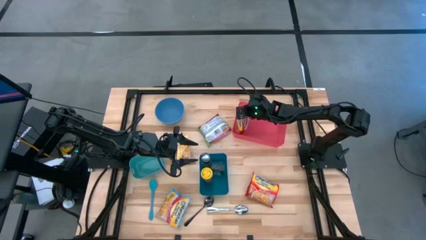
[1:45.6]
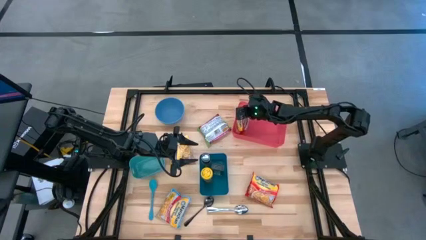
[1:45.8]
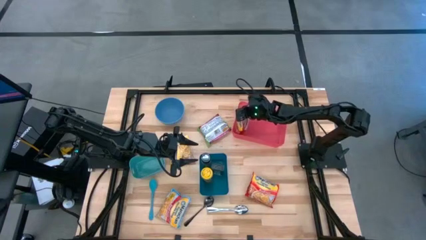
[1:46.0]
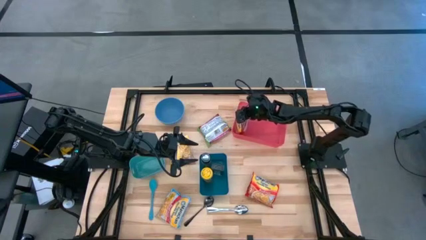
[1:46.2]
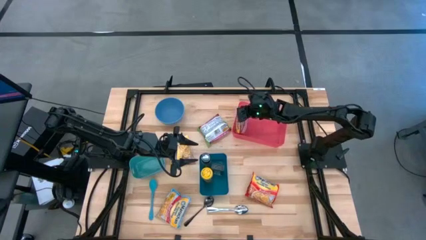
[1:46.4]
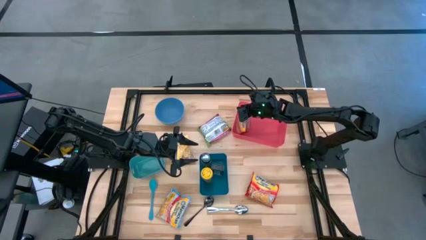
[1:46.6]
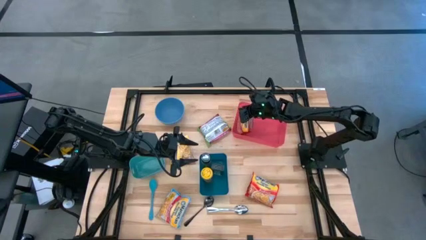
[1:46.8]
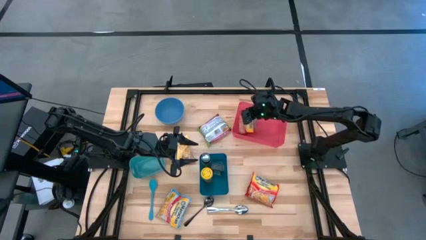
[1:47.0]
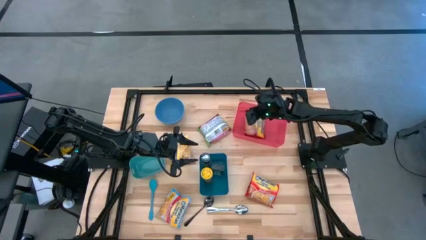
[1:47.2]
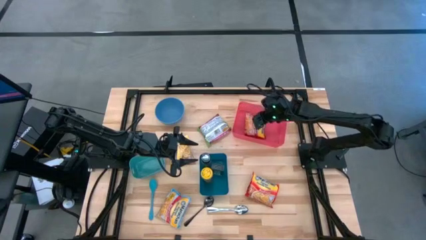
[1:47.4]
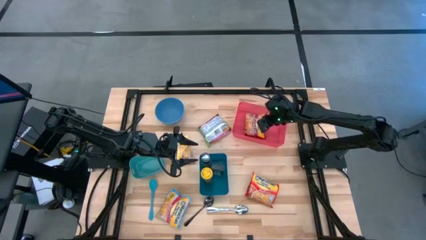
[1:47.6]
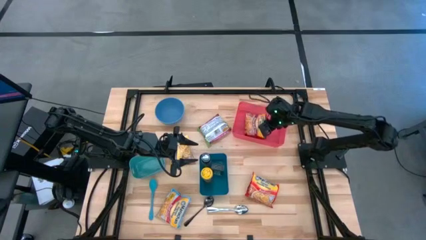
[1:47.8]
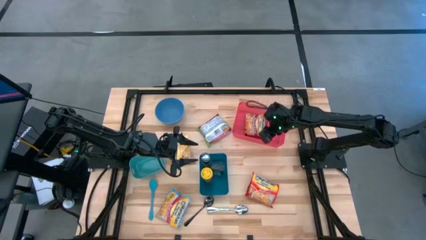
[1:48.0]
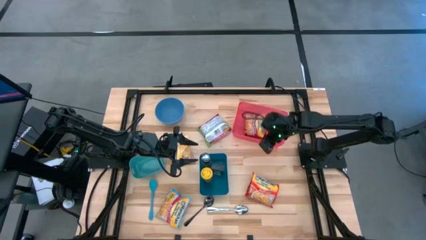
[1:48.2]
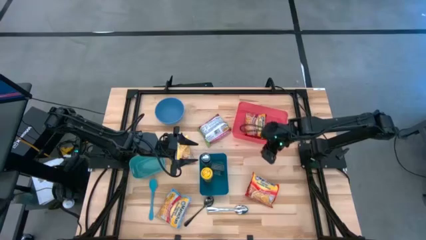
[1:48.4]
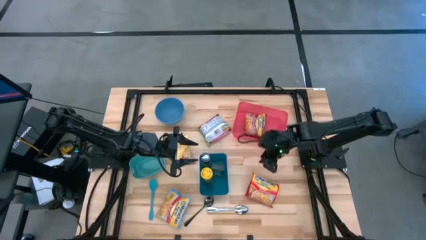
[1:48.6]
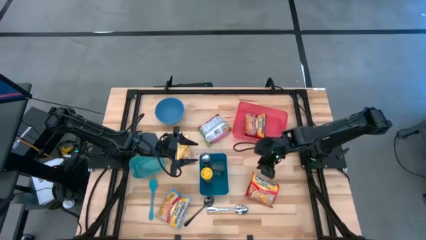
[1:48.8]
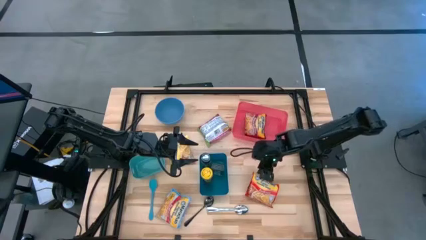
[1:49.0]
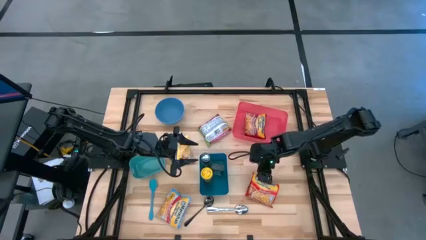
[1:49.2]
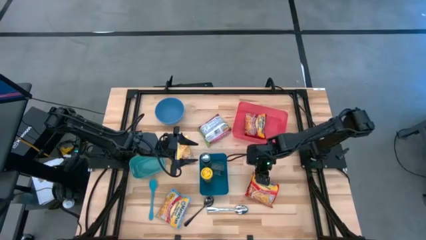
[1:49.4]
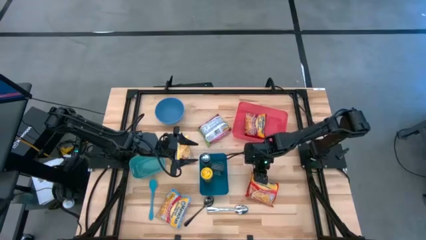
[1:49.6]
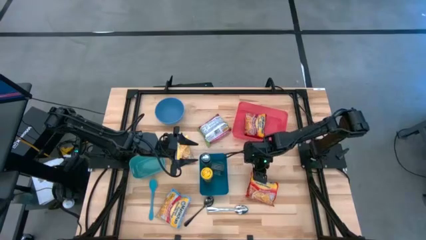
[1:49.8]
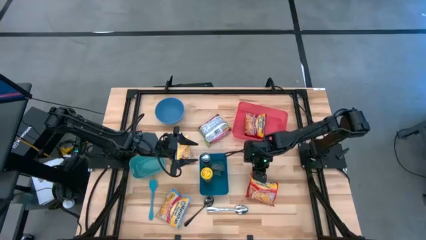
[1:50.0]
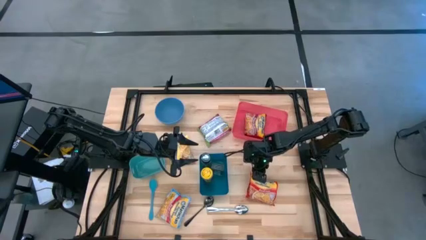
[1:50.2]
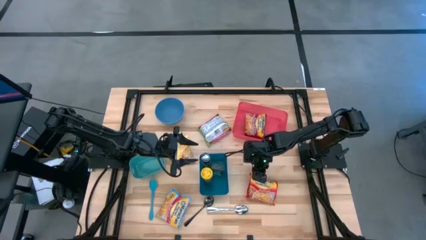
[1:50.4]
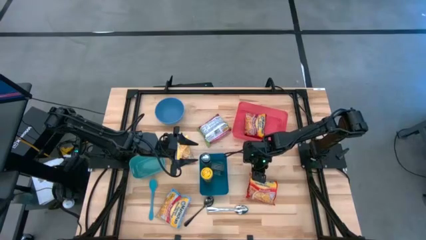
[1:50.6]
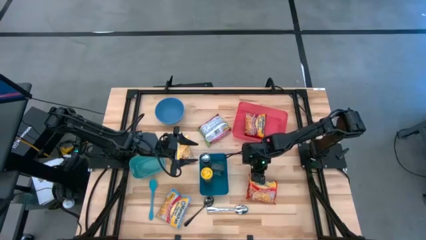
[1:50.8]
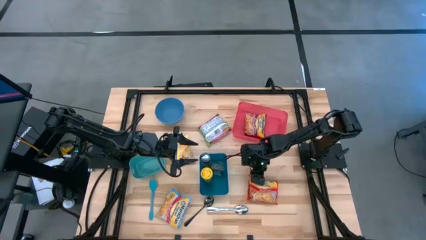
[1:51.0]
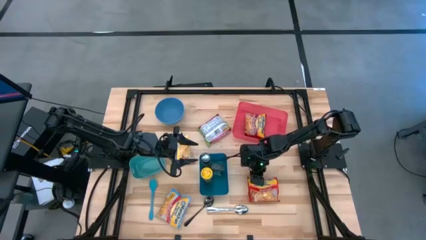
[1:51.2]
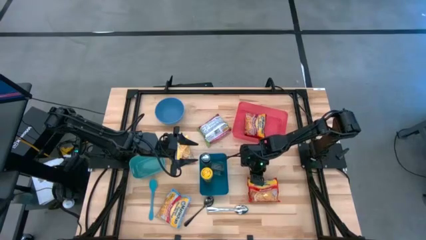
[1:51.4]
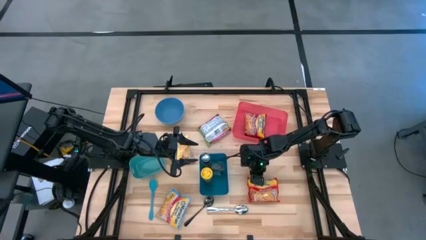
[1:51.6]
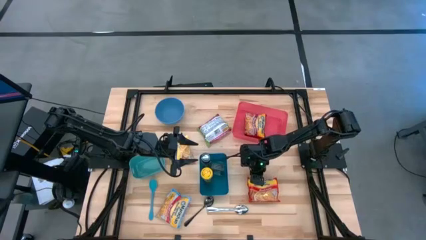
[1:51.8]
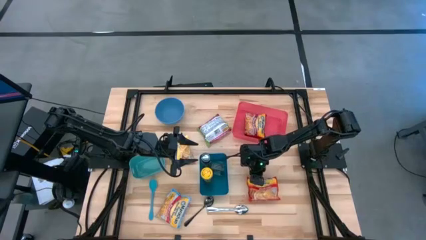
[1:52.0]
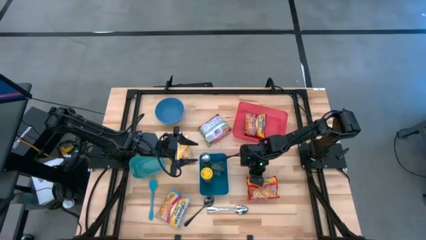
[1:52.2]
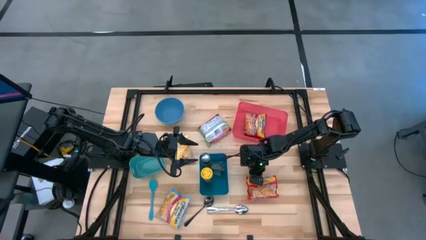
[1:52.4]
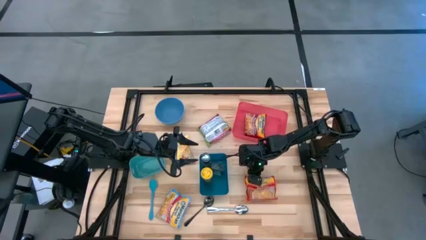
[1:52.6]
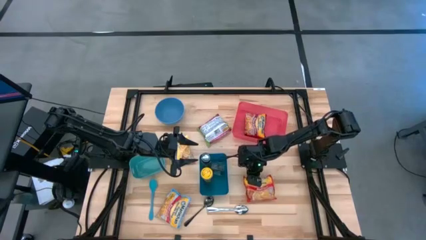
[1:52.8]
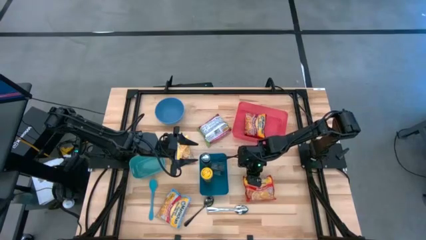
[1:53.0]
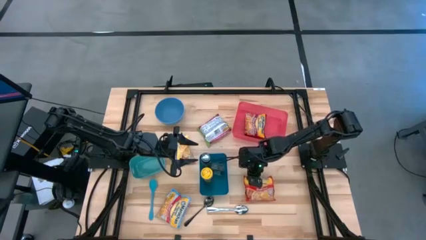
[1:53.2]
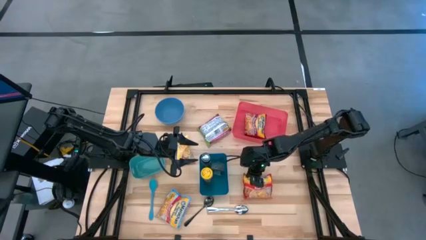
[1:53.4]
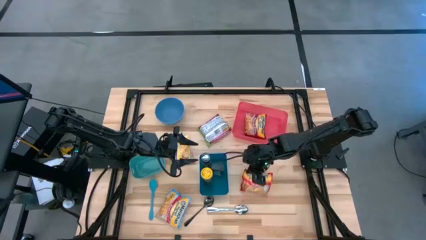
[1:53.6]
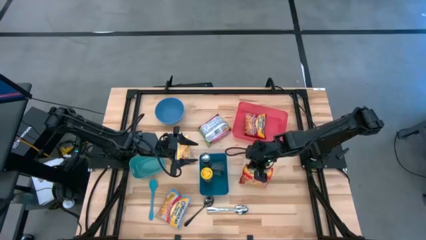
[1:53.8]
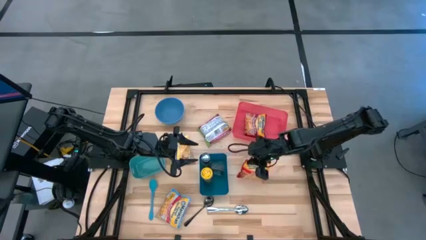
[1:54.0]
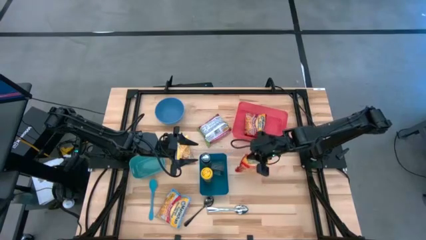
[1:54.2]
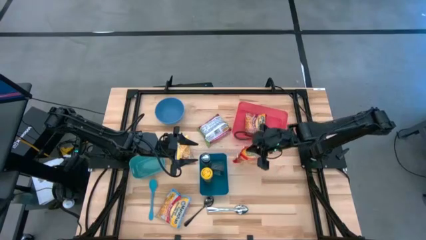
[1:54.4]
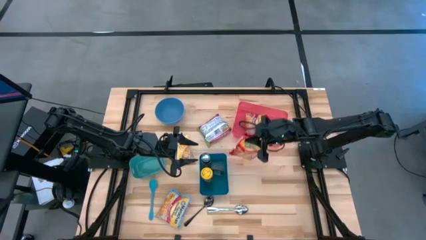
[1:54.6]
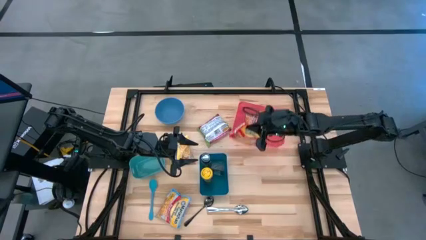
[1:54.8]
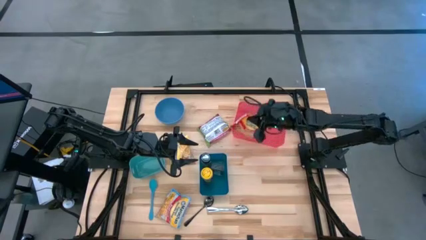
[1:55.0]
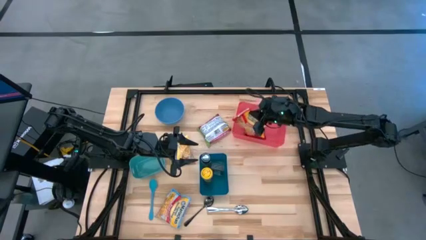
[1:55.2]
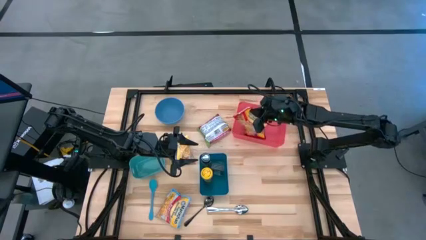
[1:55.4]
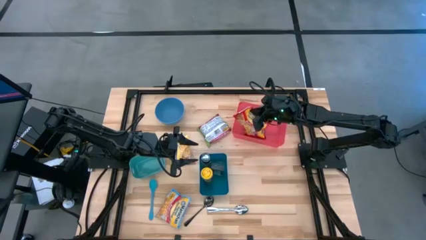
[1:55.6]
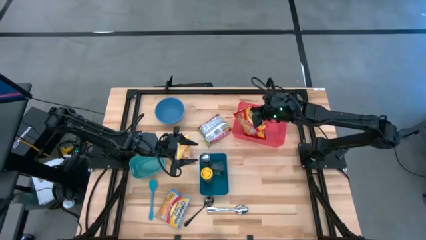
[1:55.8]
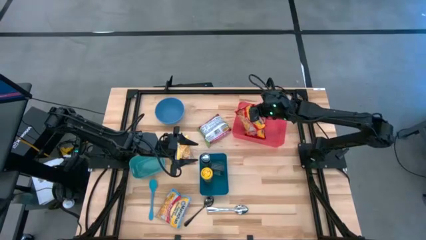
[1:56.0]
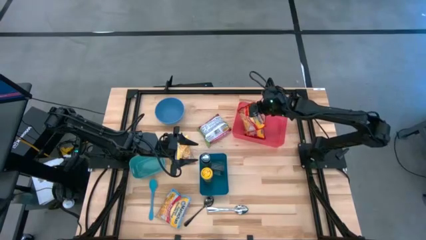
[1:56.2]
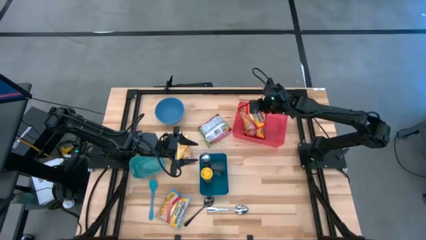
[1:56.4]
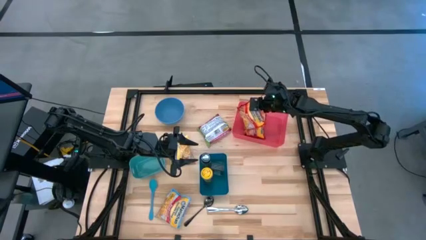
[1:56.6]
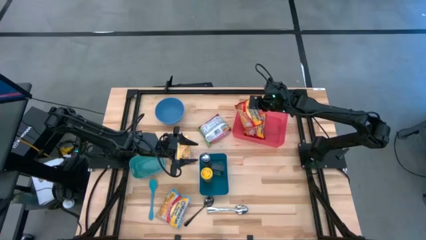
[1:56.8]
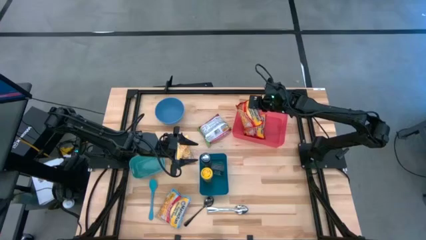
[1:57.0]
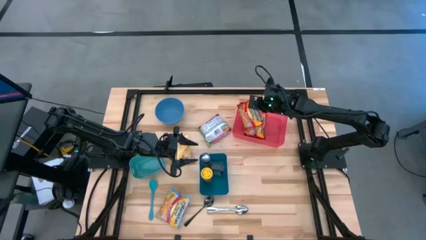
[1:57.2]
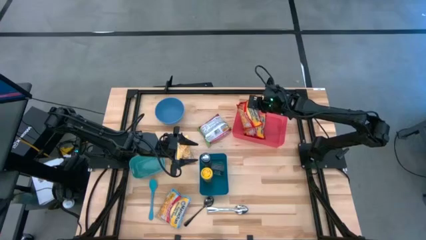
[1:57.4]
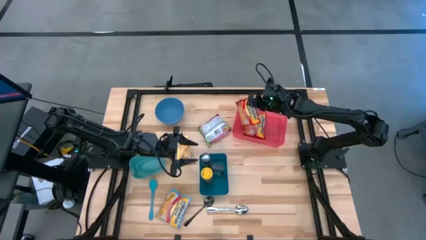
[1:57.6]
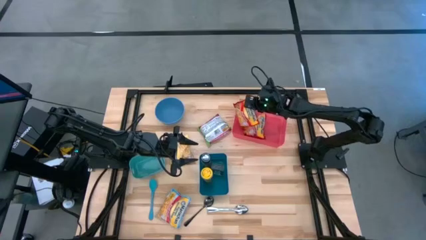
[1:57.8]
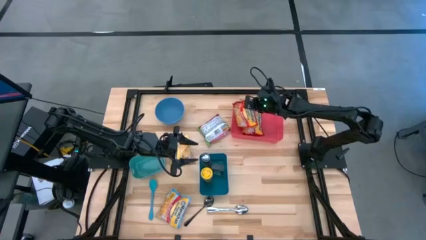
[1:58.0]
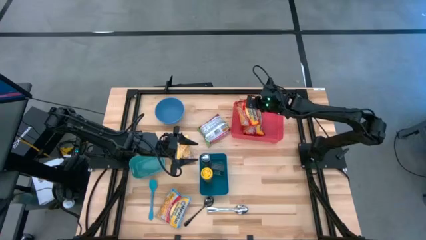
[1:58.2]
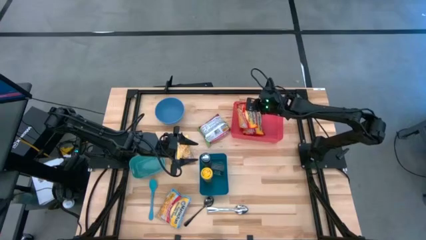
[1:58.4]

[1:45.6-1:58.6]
Task: Pick & Place Food Item
Put the red noodle pack into the red bin

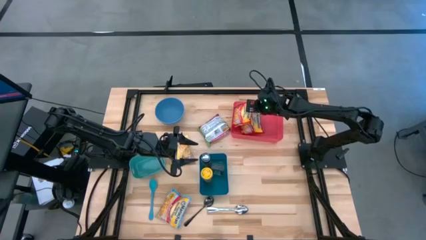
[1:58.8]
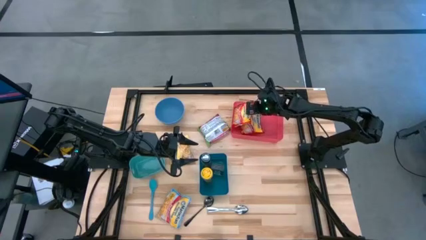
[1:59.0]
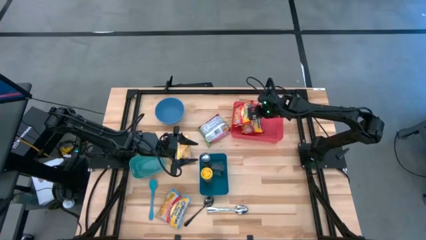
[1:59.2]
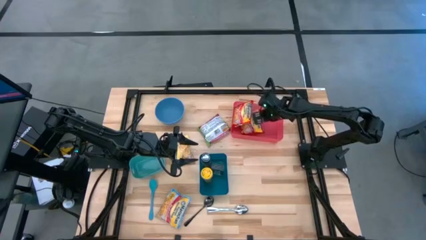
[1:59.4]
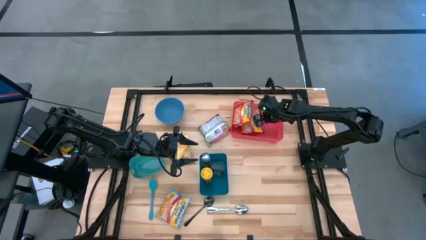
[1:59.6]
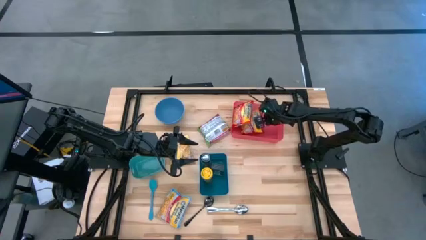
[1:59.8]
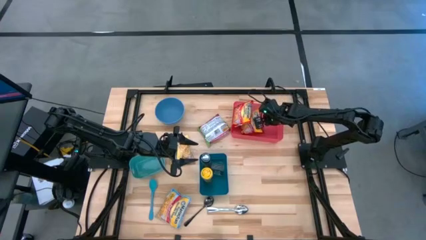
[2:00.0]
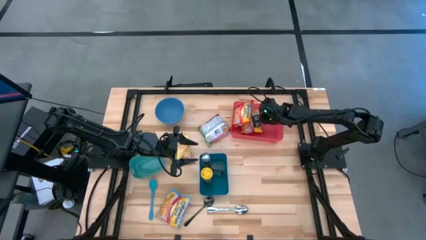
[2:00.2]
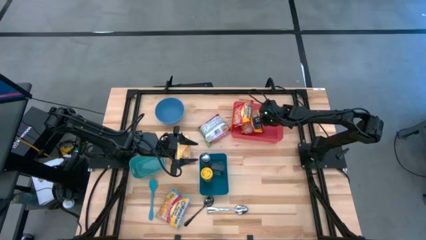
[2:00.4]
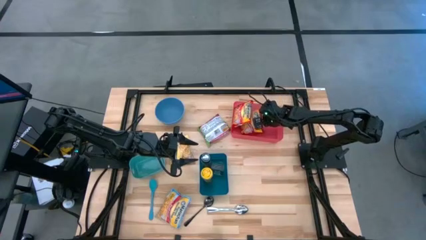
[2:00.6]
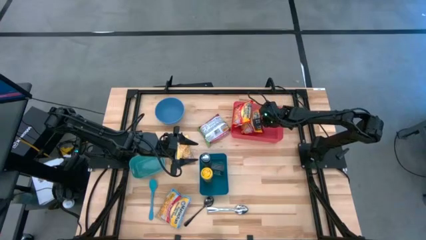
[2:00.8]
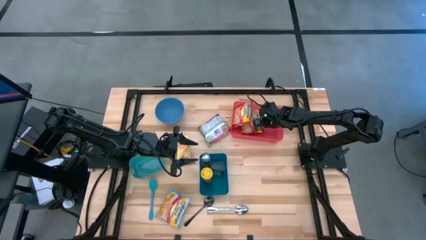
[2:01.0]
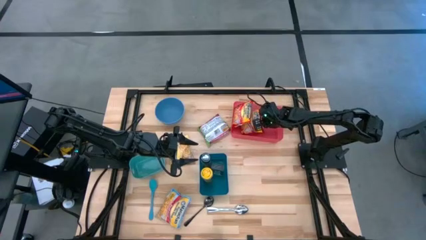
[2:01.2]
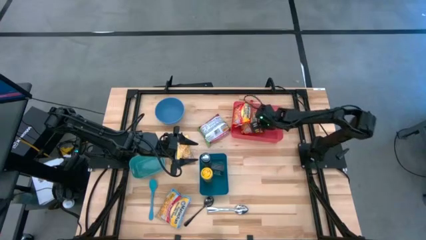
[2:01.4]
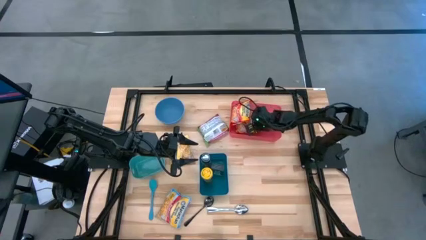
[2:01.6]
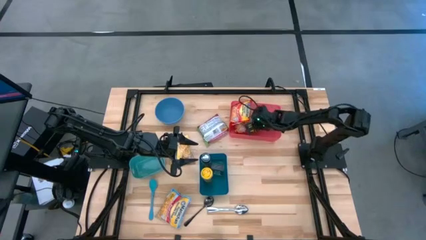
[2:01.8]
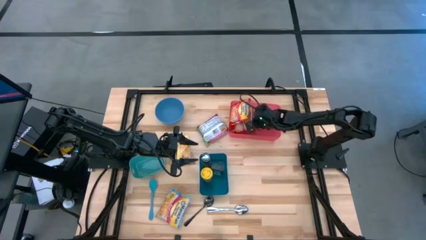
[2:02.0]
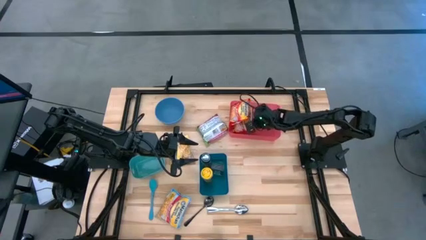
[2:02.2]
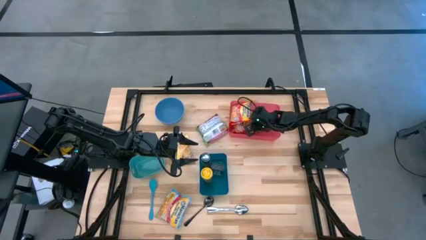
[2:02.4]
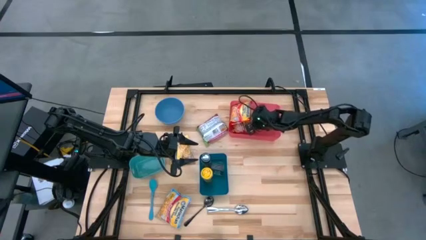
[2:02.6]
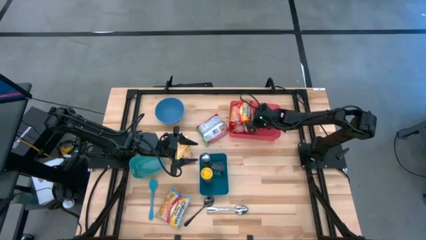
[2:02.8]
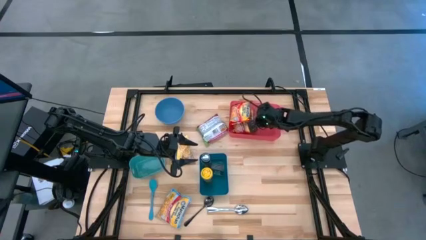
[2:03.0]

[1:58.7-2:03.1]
Adjust the red noodle pack in the red bin
